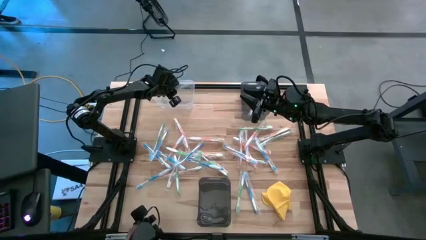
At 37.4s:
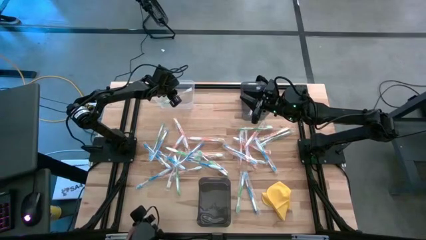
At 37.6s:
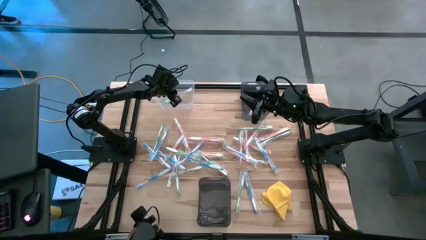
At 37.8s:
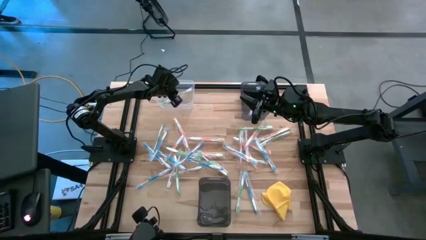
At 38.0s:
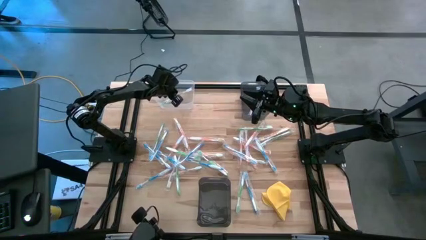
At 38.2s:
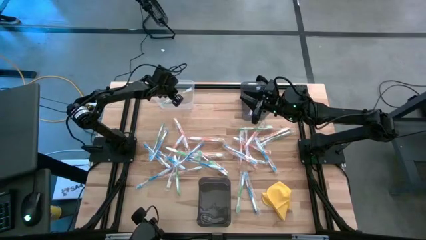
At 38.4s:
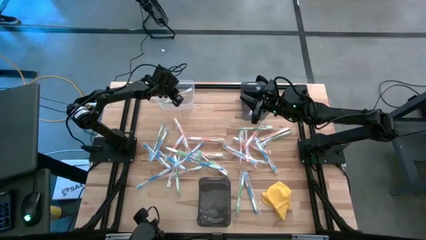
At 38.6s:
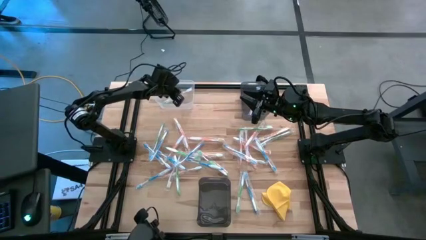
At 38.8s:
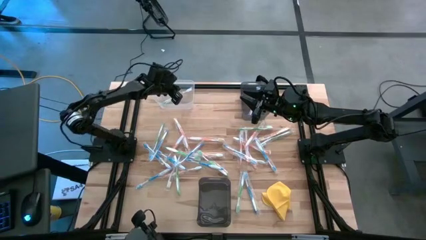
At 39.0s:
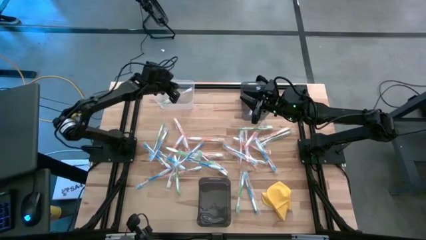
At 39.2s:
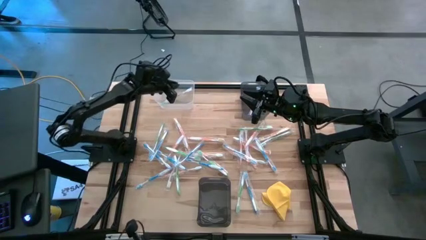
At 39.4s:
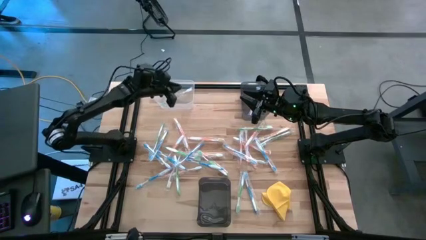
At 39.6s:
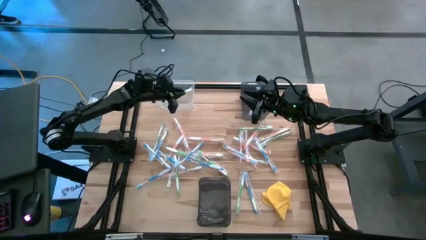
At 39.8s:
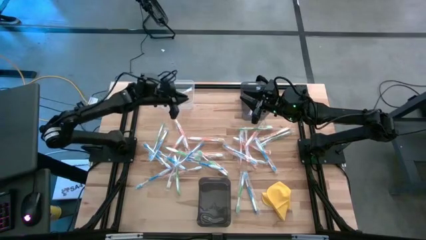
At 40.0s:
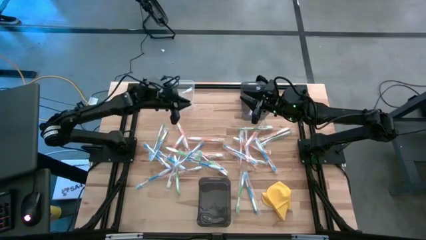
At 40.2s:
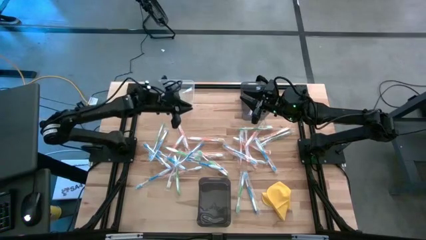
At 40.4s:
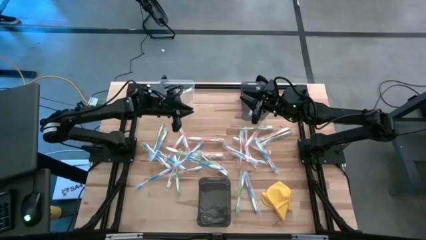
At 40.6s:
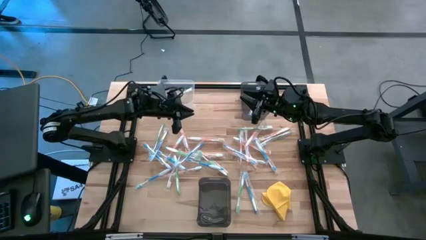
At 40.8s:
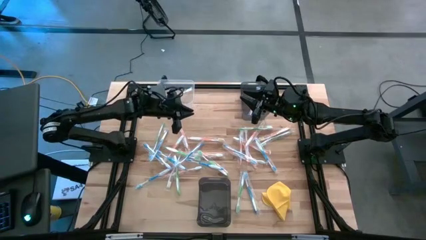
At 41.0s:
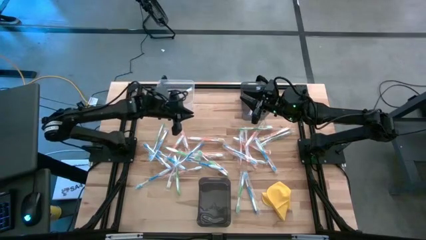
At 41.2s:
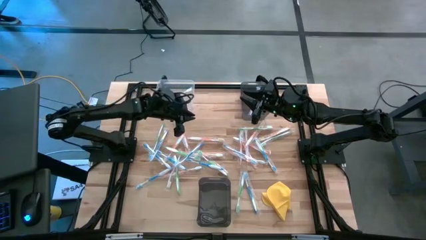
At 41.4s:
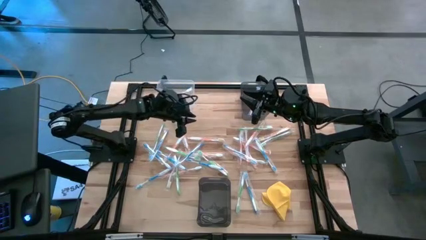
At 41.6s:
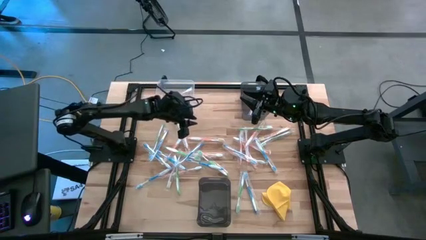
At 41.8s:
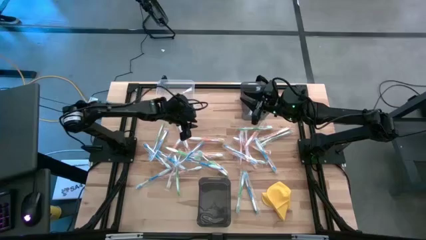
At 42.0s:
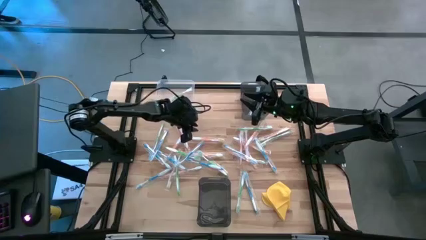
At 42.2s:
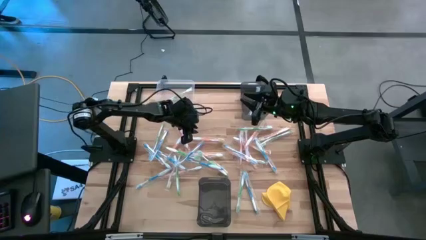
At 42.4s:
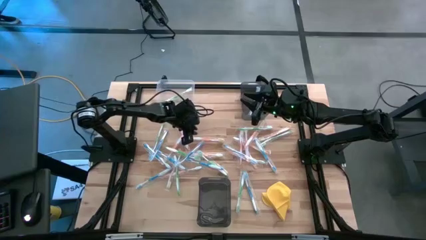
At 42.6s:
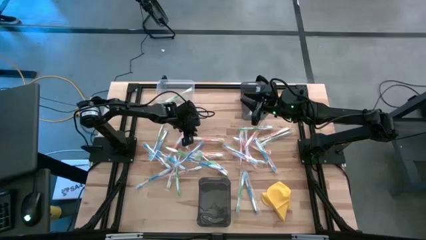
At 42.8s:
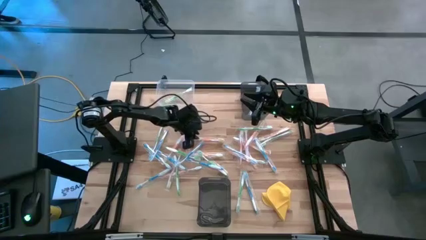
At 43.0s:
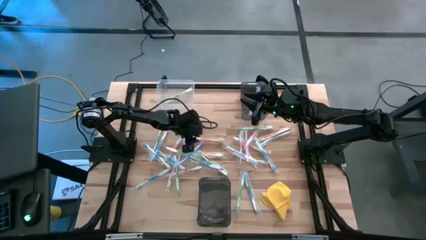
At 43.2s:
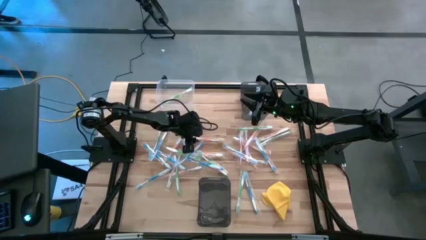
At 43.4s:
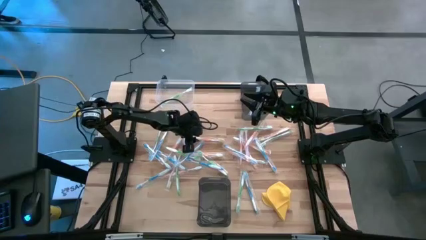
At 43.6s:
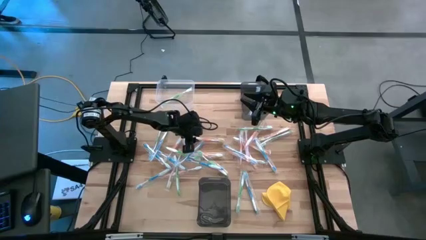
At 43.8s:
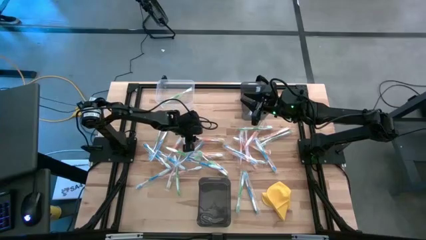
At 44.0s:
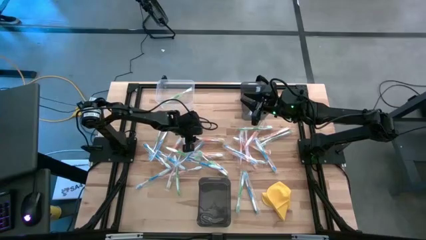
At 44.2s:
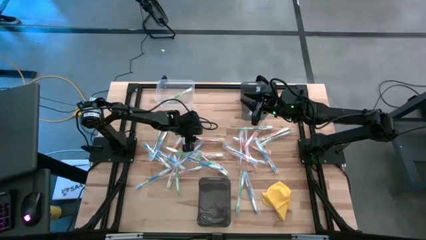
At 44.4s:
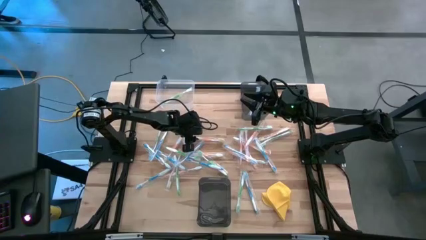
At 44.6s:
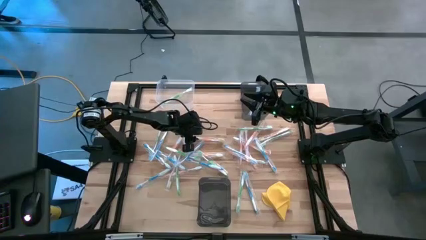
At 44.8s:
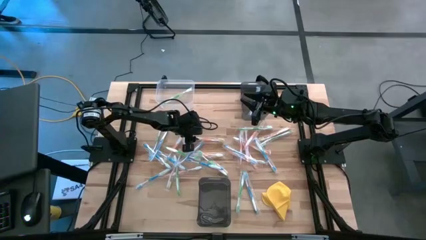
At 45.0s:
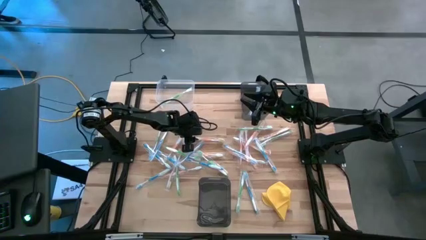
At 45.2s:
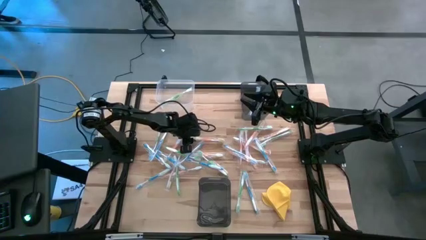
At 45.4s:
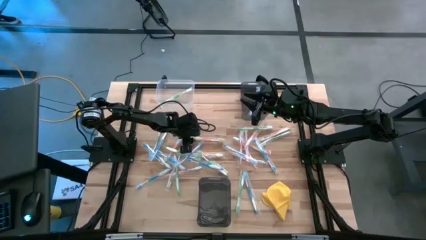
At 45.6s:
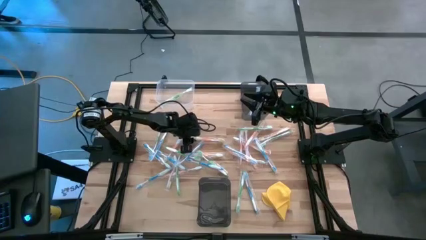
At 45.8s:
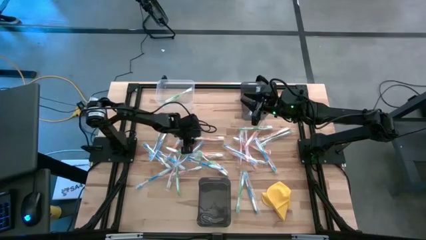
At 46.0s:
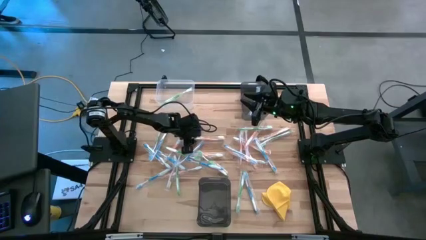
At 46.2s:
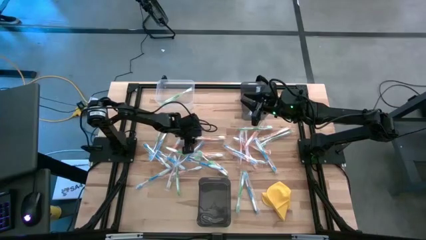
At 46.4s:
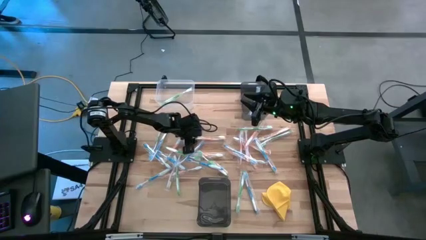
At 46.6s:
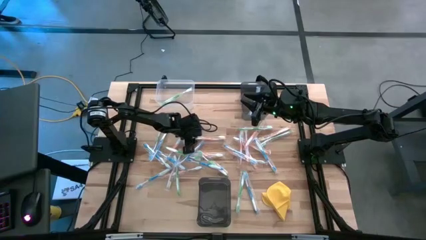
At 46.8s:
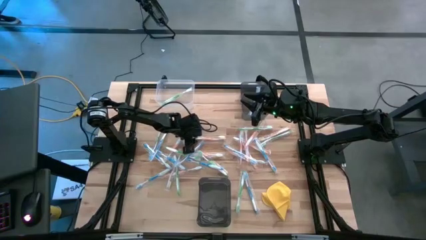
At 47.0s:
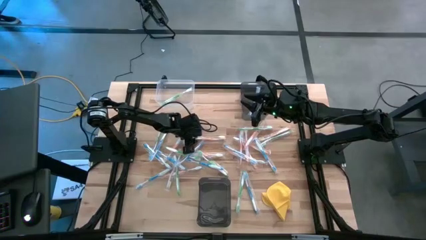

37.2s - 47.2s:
Task: Pick & Place Toothbrushes
Put the orange toothbrush into the bottom black bin
